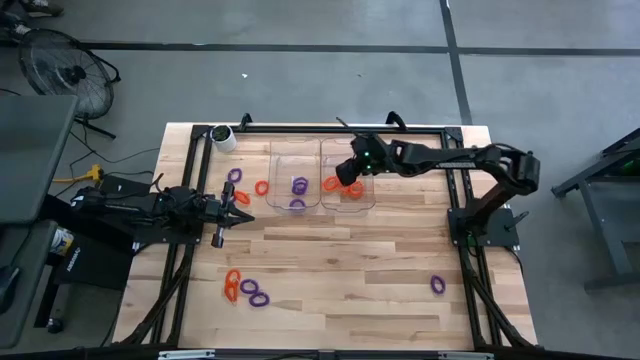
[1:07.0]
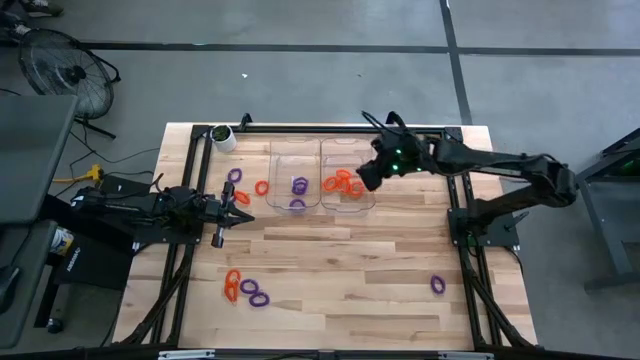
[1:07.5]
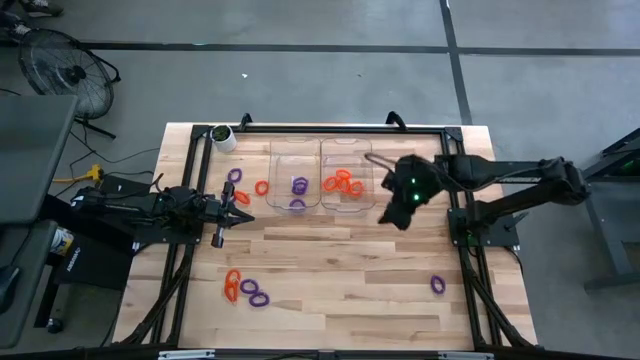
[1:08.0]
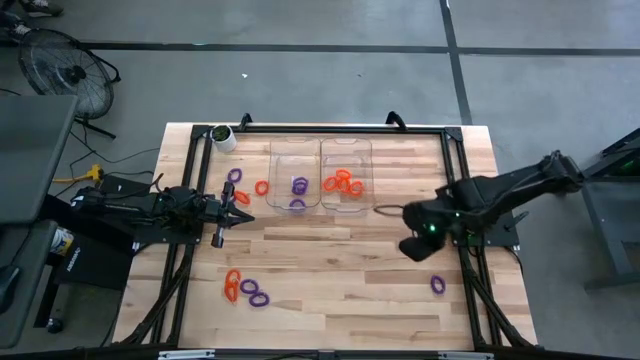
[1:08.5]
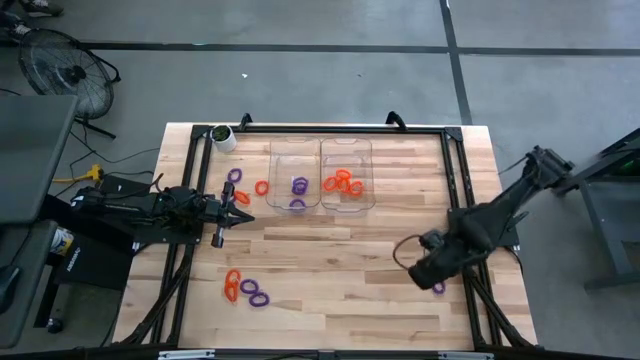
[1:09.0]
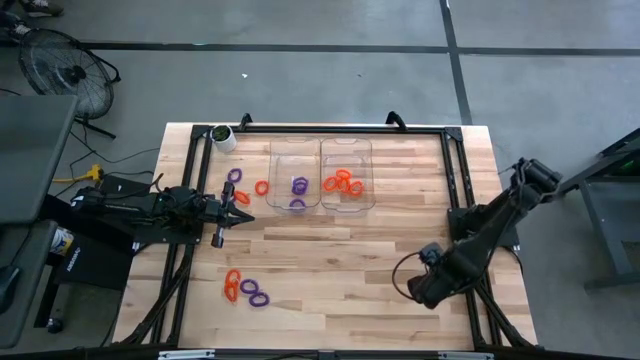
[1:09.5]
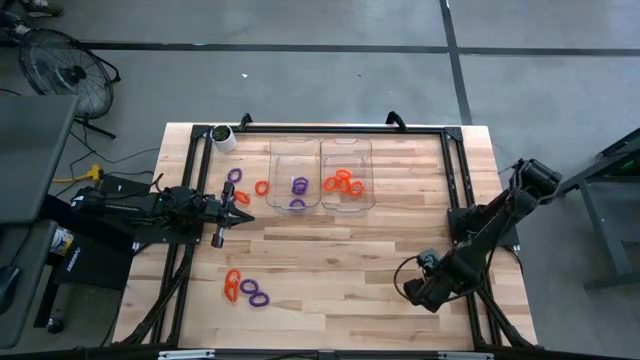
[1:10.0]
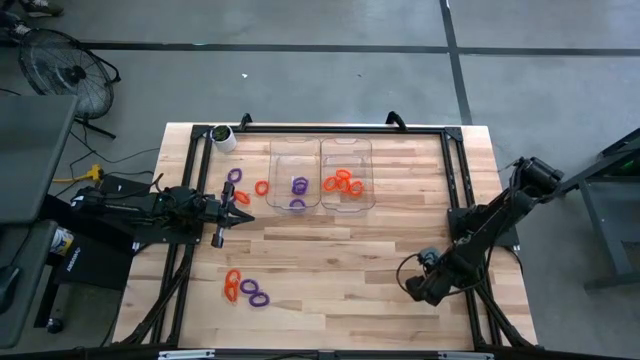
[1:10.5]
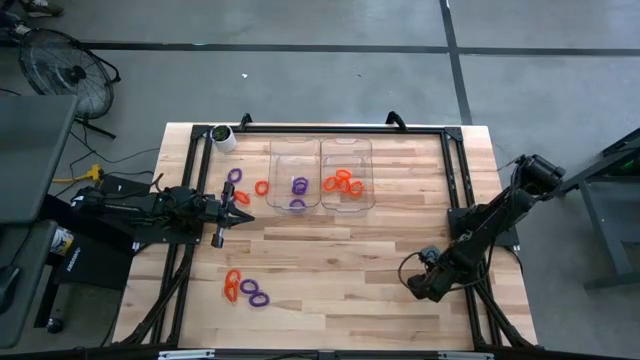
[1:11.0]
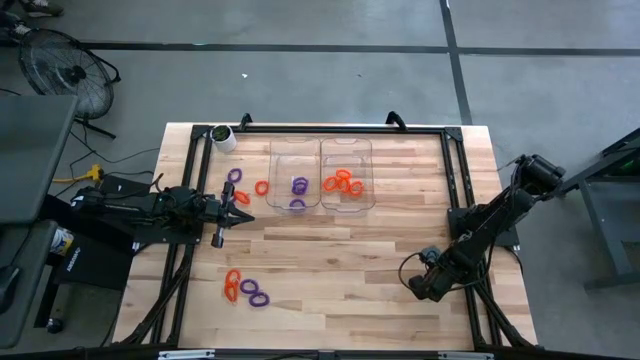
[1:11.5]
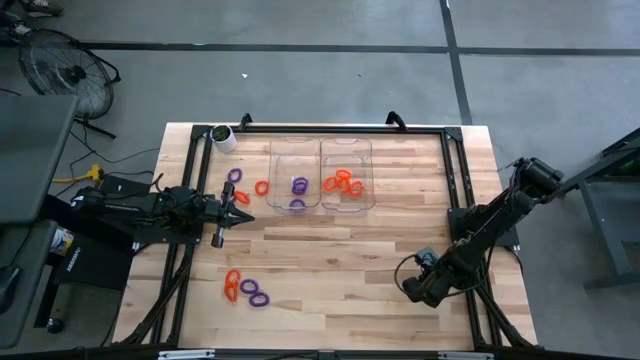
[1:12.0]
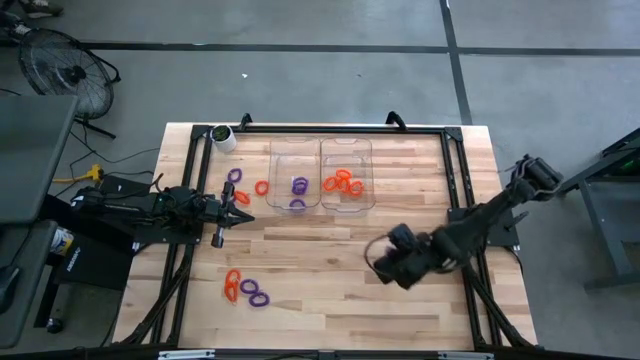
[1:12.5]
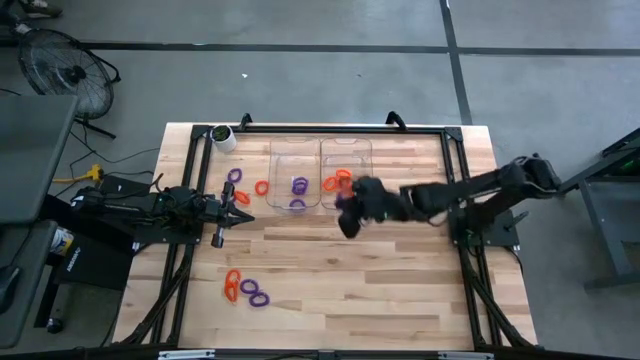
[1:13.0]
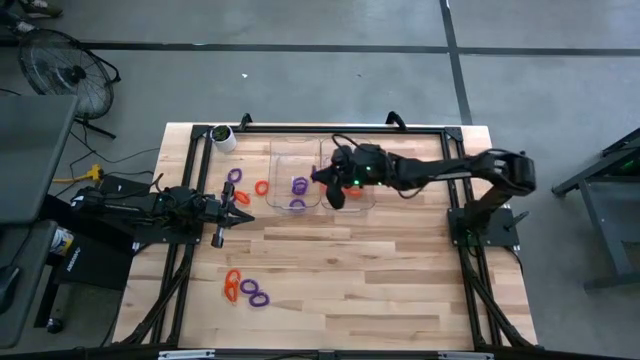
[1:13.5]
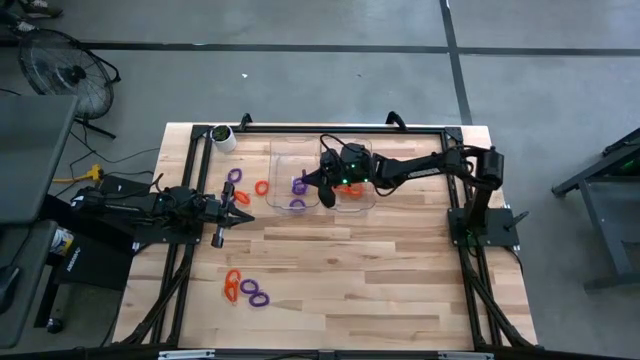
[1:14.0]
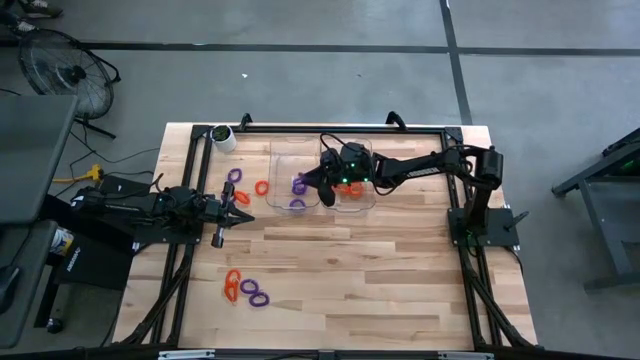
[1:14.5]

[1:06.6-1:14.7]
Task: Sort spring keychains
Put the purple spring keychain into the left transparent bin

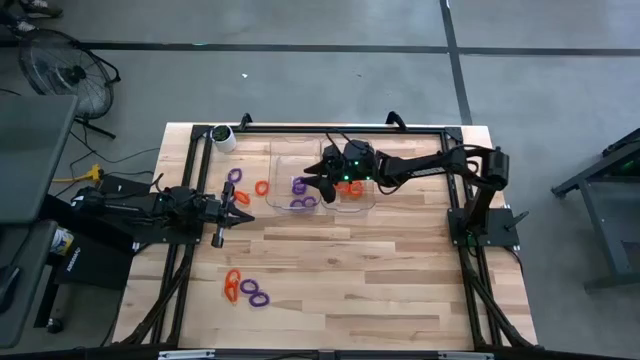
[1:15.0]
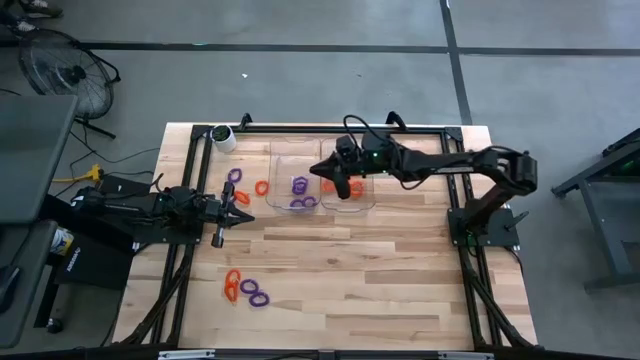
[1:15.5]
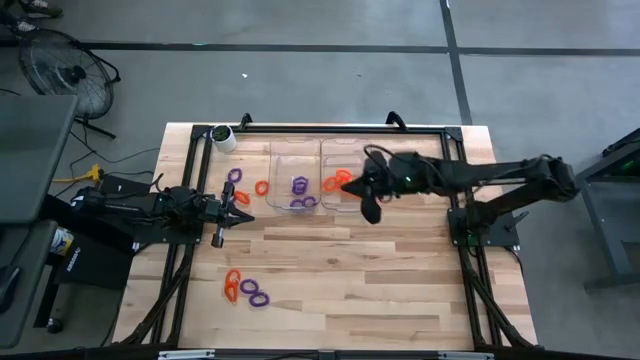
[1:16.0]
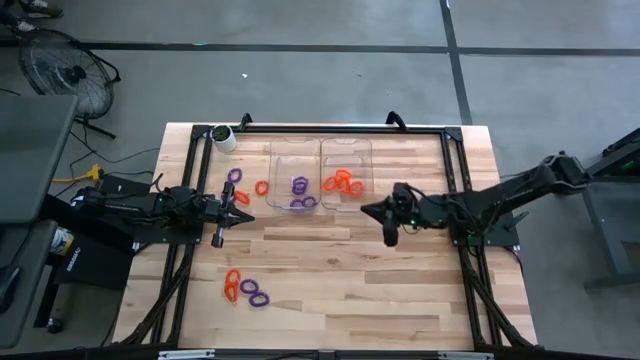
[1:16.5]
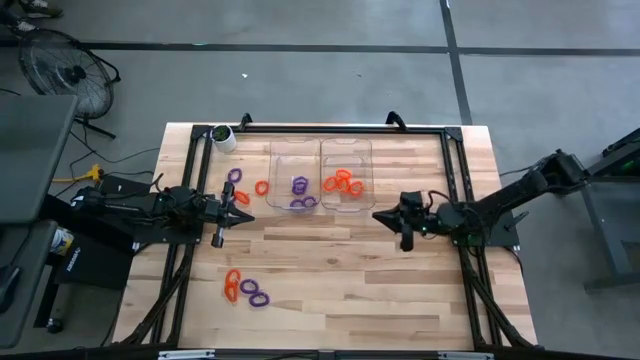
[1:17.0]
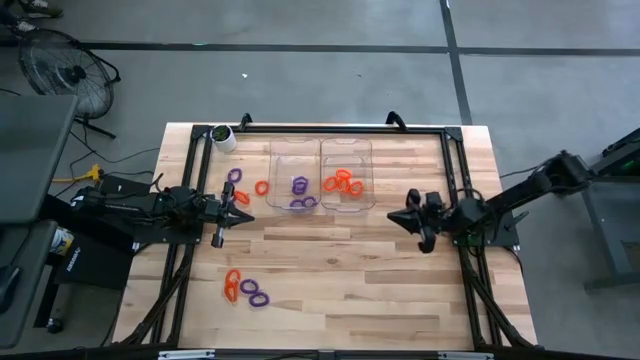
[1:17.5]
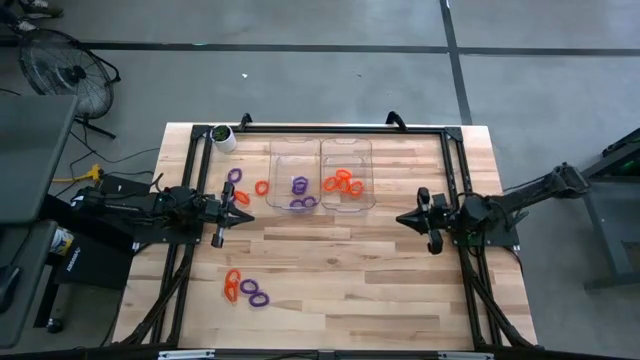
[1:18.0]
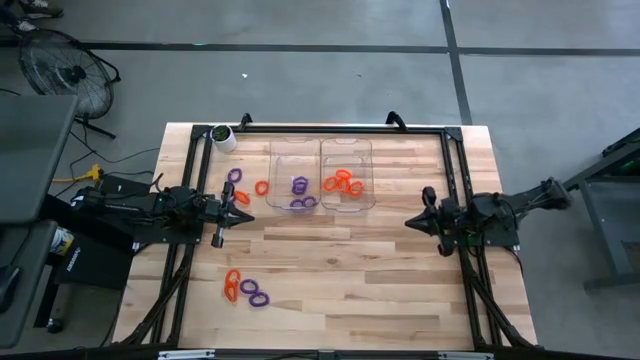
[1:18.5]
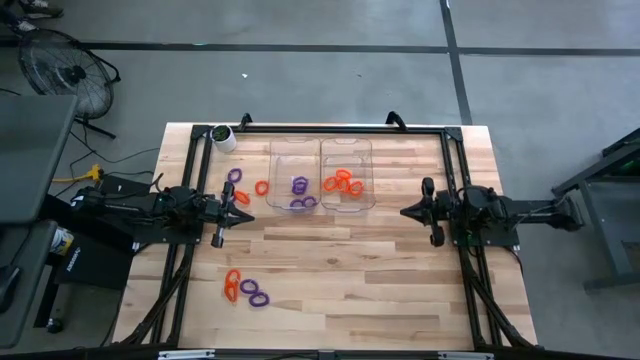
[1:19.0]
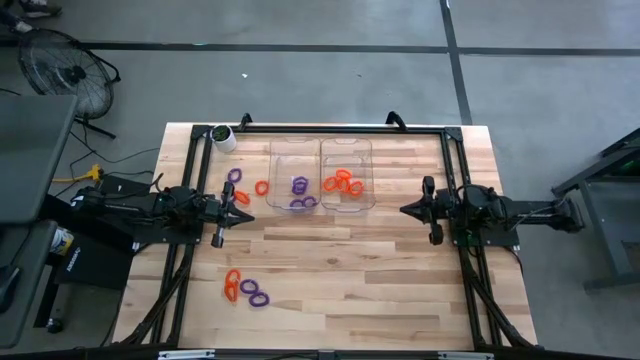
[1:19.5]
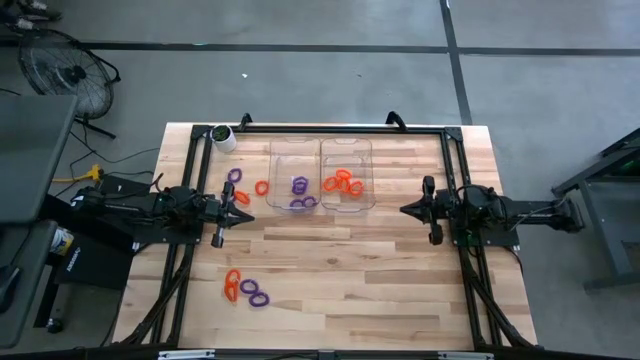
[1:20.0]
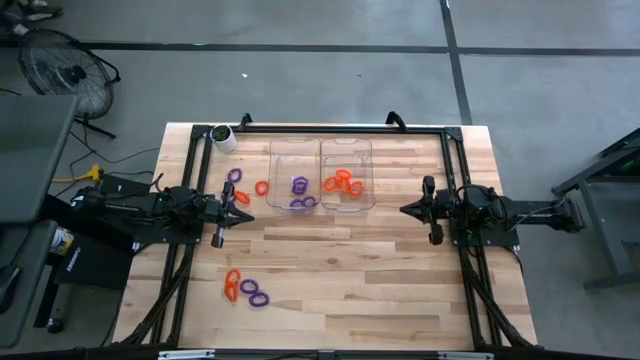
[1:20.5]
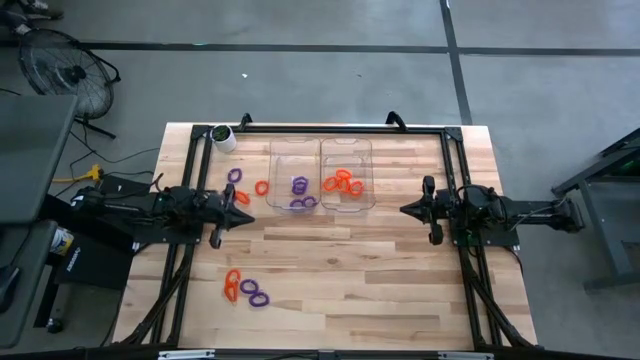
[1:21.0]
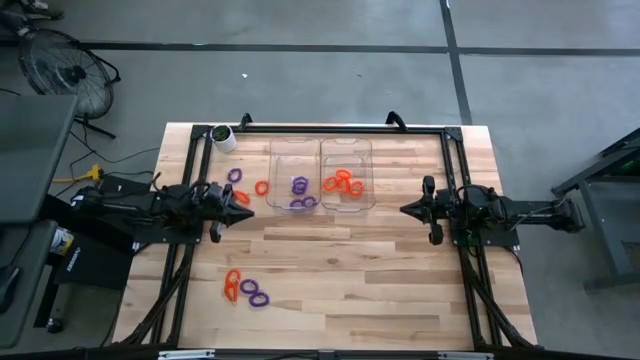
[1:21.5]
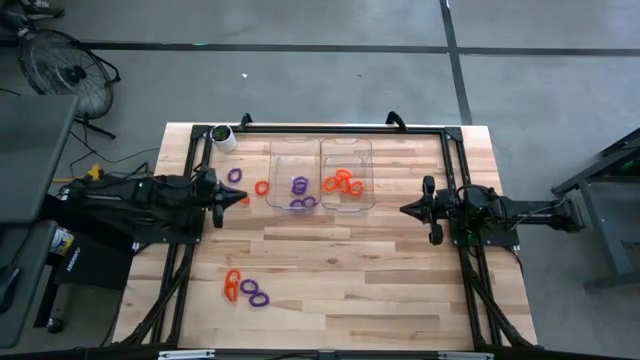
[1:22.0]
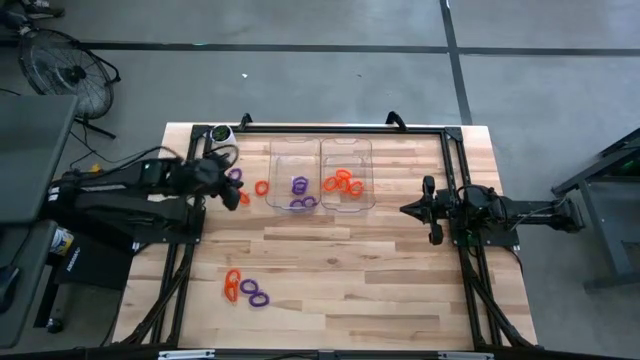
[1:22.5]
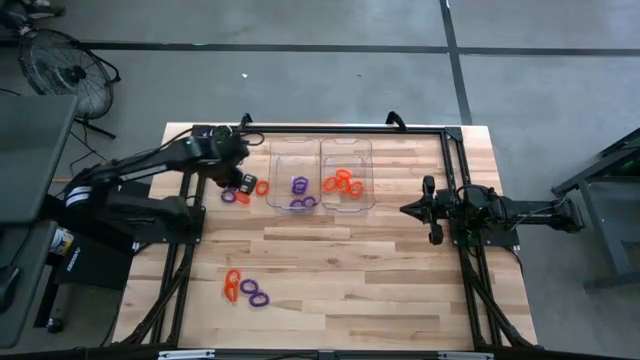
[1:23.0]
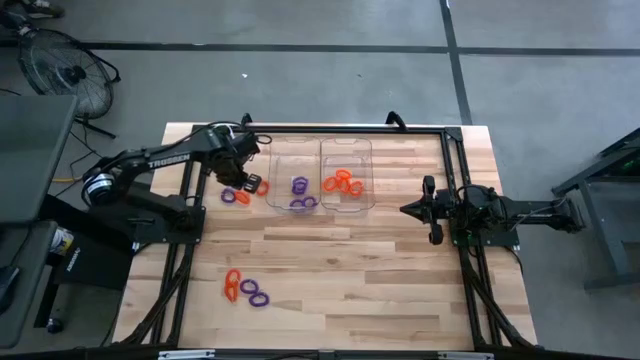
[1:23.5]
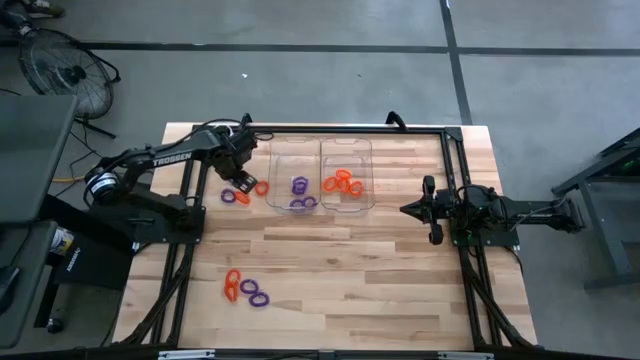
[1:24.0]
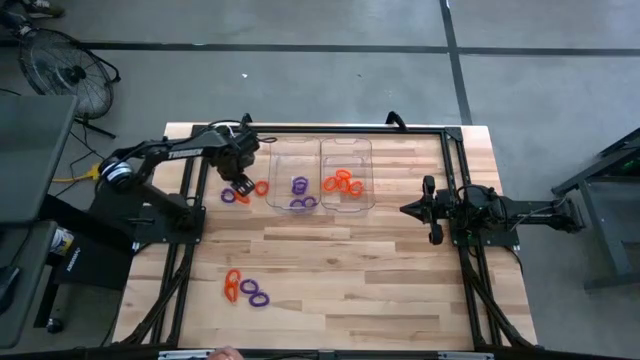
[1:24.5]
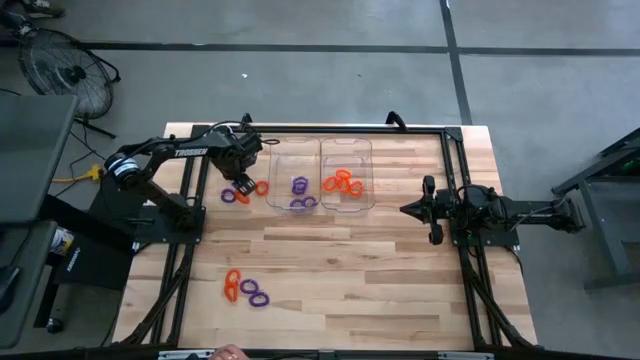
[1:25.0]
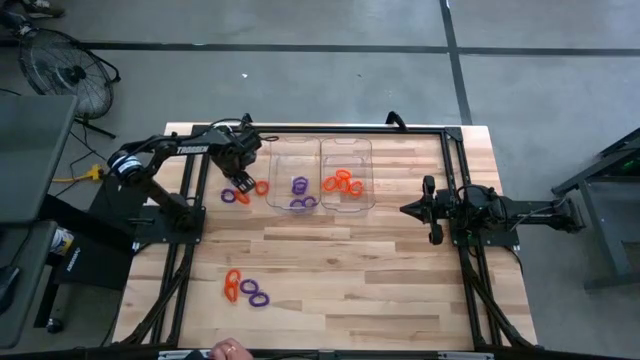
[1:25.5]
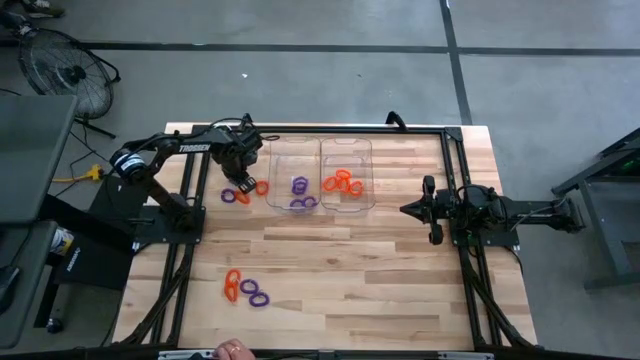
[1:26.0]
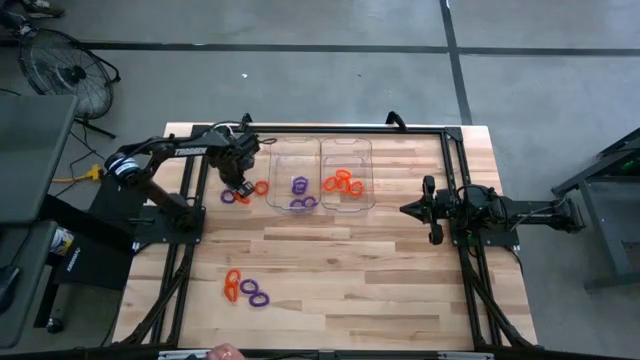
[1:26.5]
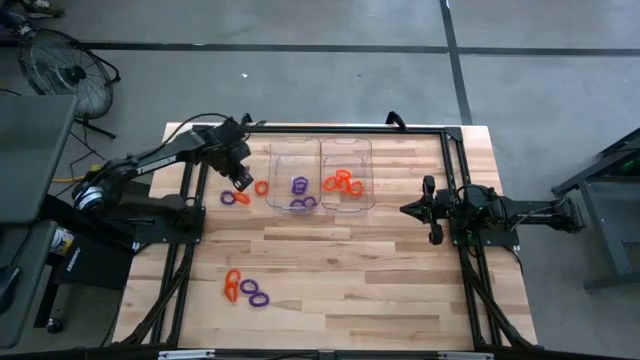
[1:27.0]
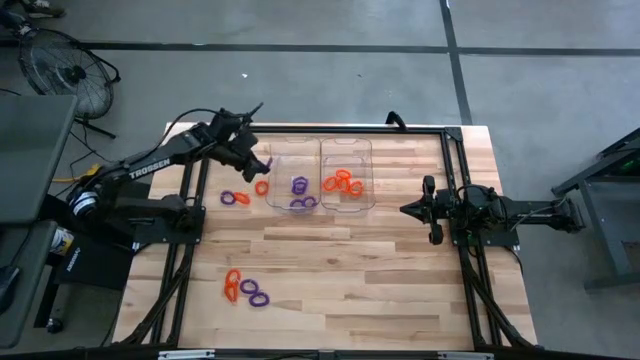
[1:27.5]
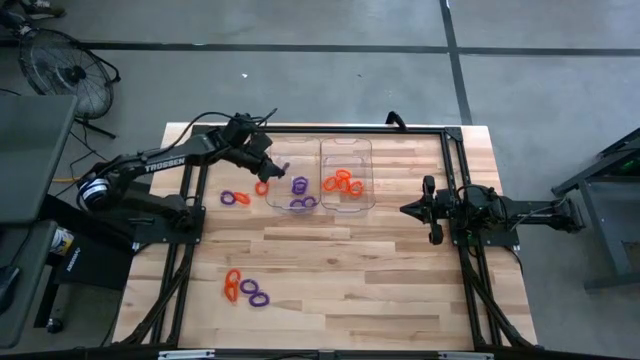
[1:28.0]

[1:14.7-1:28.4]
Put the purple spring keychain into the left transparent bin

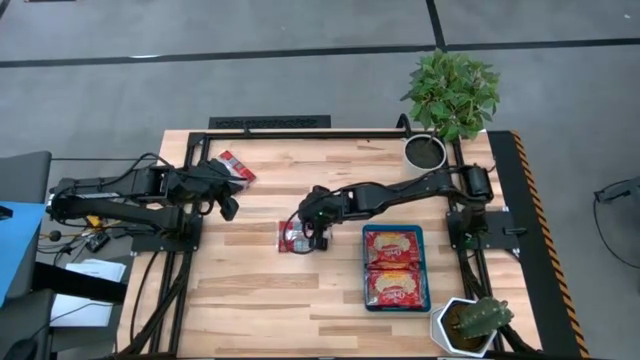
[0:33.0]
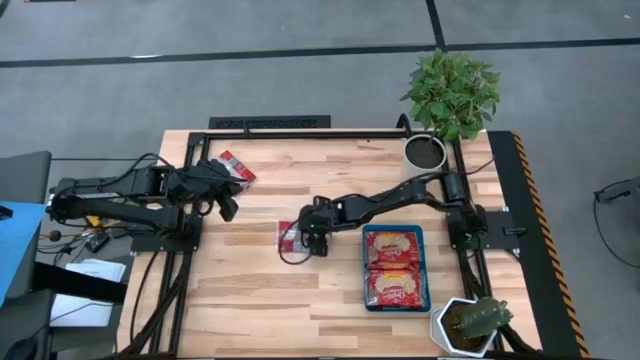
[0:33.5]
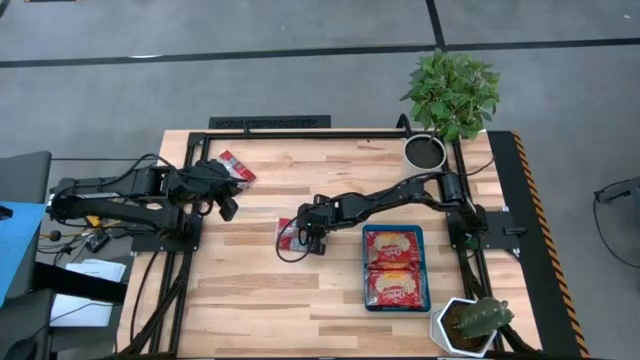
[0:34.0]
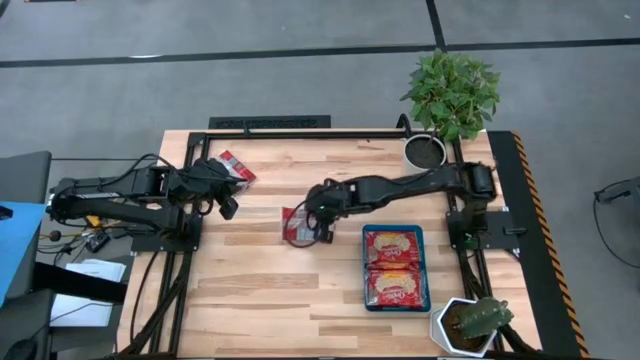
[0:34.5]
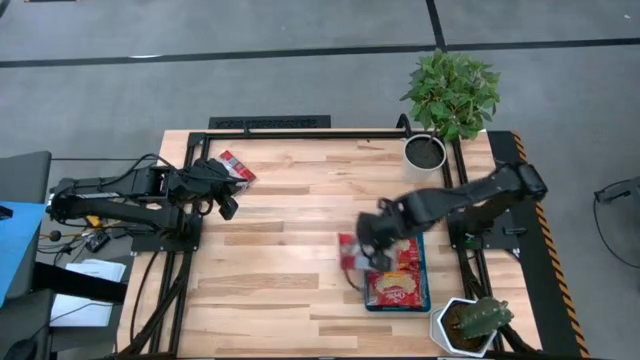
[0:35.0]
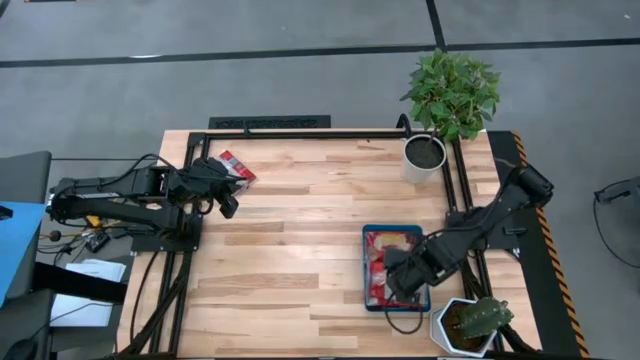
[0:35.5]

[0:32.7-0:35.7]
Task: Sort popcorn bags into baskets
Put the bottom red popcorn bag into the blue bin
